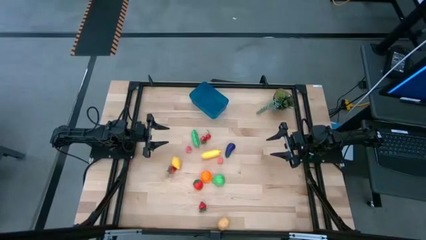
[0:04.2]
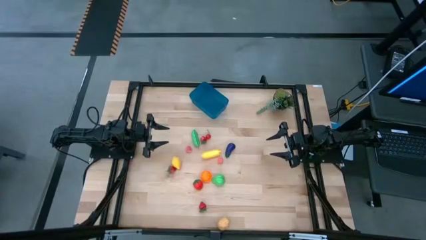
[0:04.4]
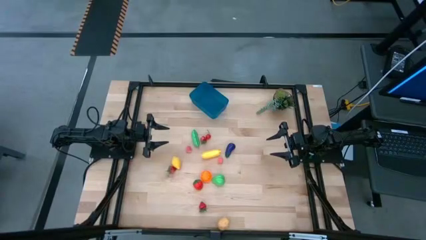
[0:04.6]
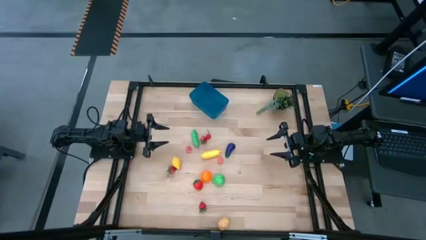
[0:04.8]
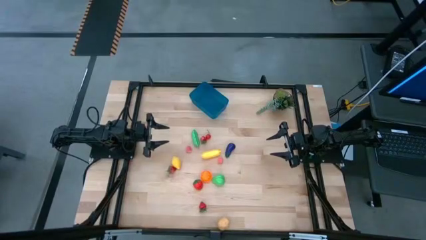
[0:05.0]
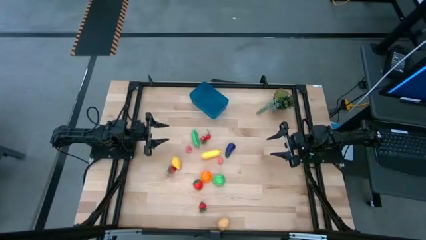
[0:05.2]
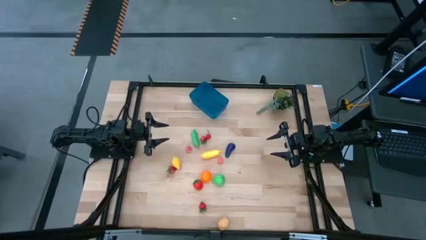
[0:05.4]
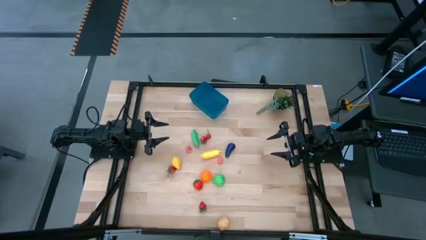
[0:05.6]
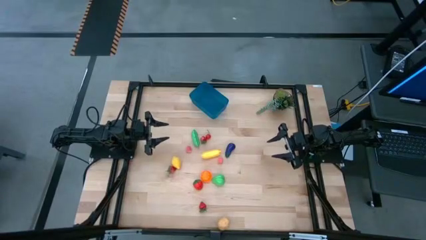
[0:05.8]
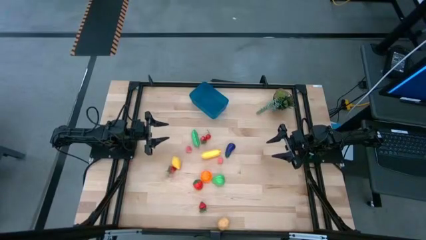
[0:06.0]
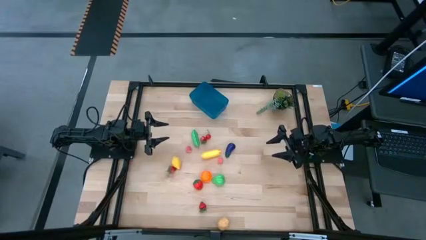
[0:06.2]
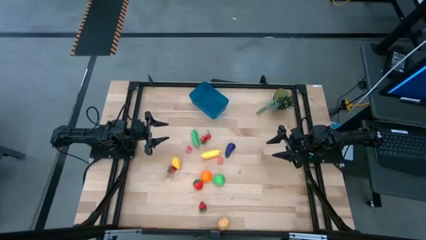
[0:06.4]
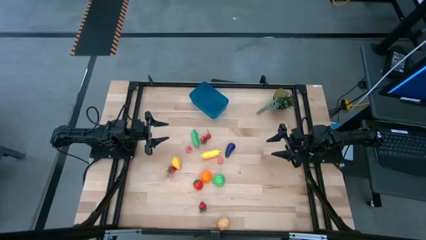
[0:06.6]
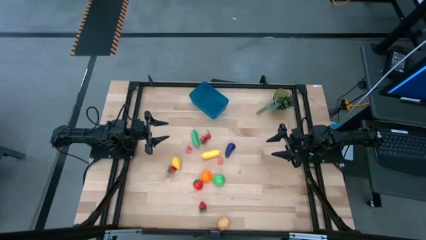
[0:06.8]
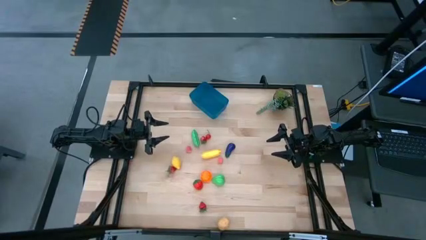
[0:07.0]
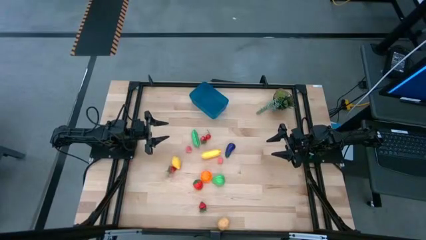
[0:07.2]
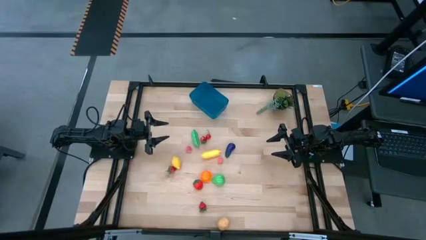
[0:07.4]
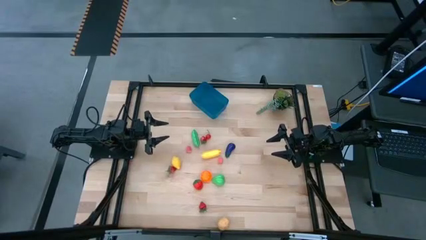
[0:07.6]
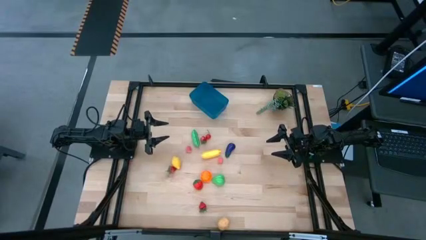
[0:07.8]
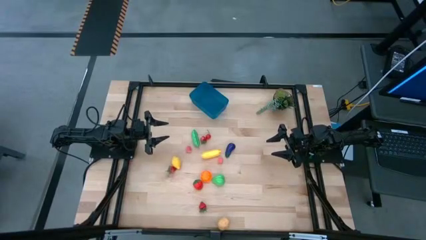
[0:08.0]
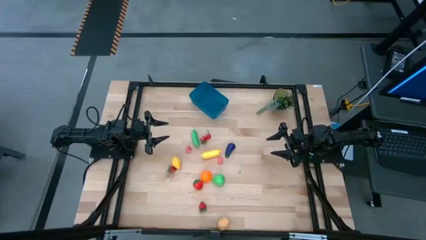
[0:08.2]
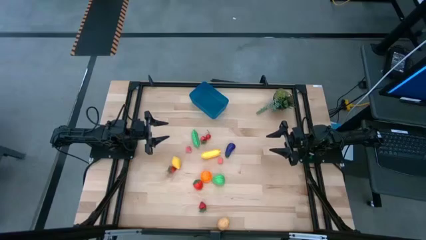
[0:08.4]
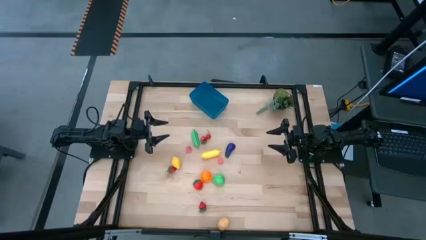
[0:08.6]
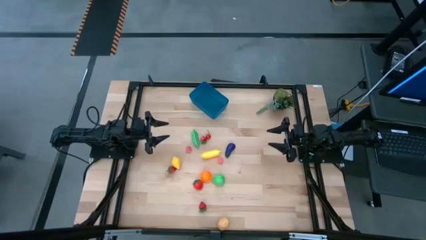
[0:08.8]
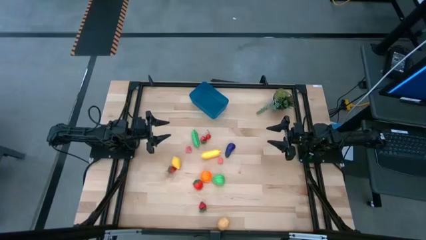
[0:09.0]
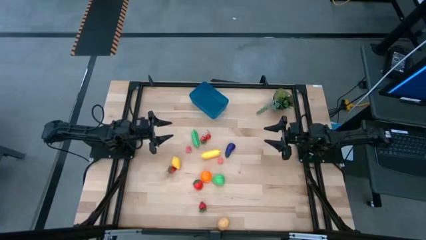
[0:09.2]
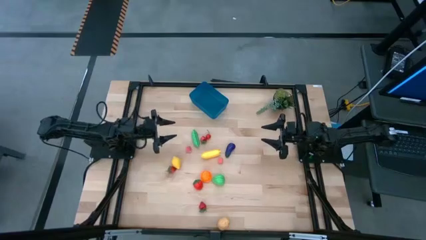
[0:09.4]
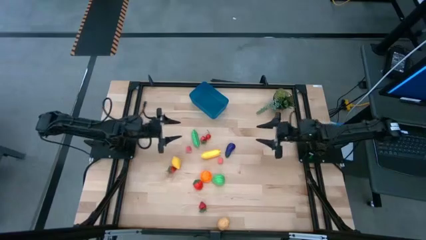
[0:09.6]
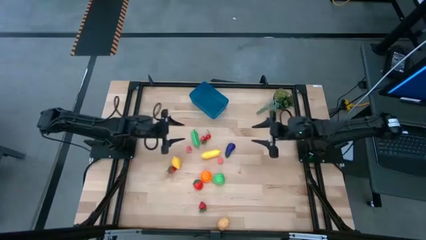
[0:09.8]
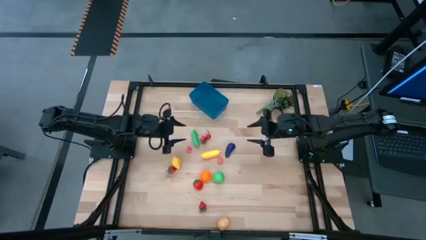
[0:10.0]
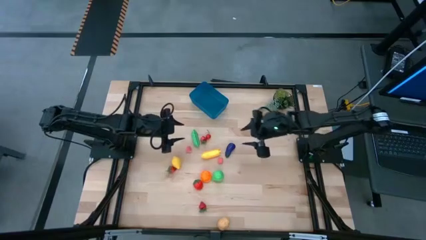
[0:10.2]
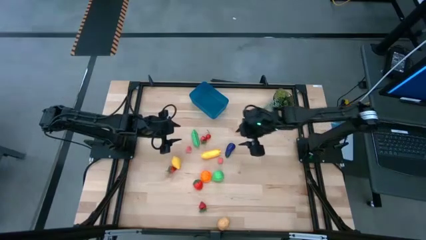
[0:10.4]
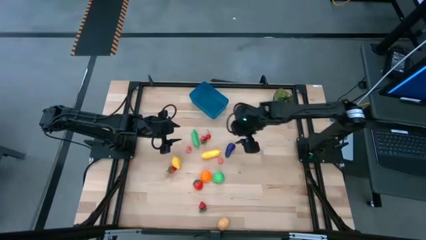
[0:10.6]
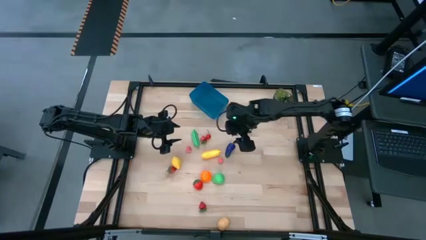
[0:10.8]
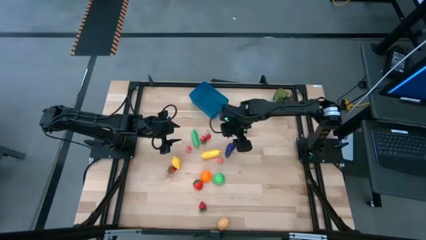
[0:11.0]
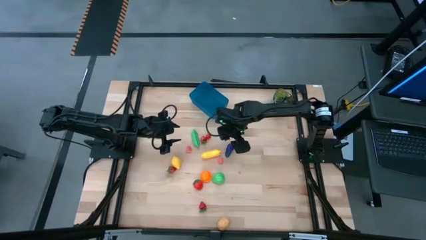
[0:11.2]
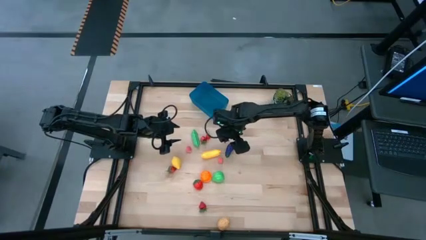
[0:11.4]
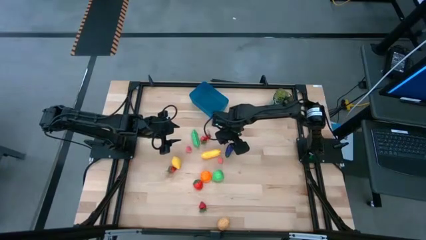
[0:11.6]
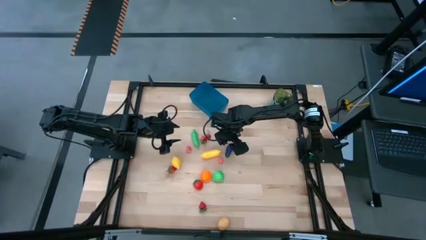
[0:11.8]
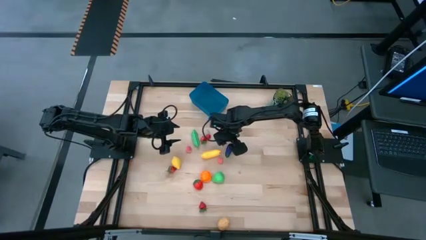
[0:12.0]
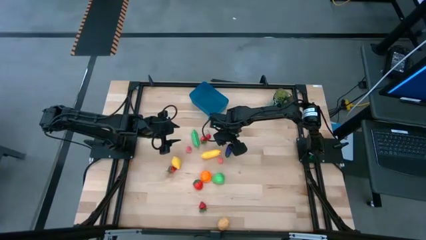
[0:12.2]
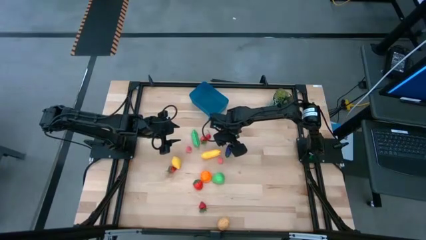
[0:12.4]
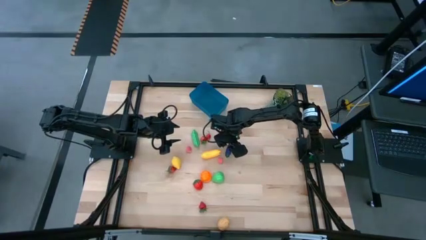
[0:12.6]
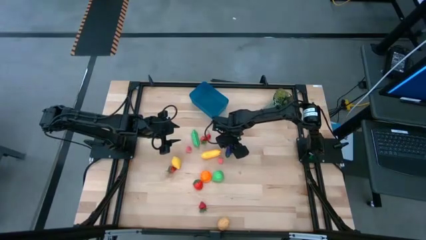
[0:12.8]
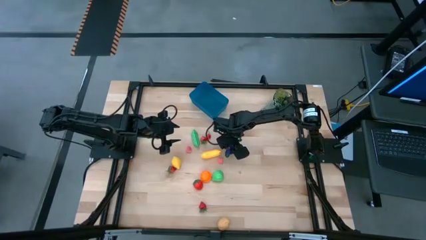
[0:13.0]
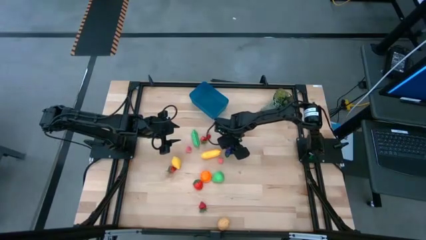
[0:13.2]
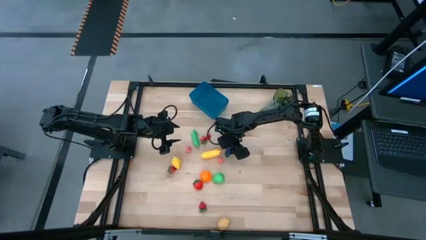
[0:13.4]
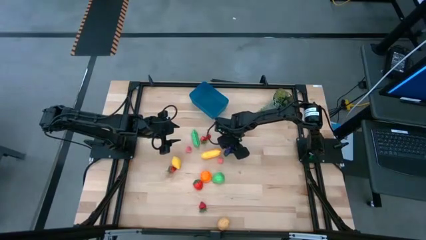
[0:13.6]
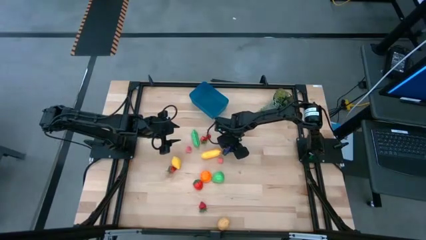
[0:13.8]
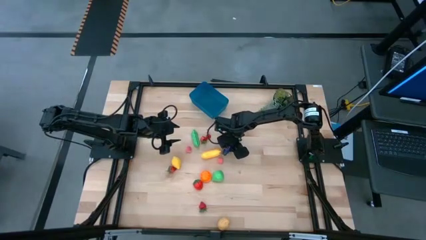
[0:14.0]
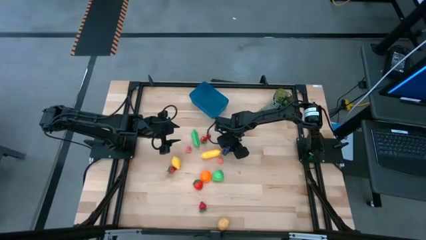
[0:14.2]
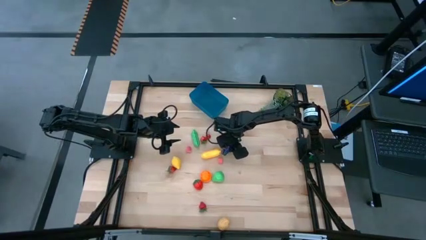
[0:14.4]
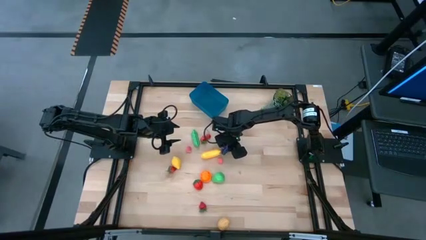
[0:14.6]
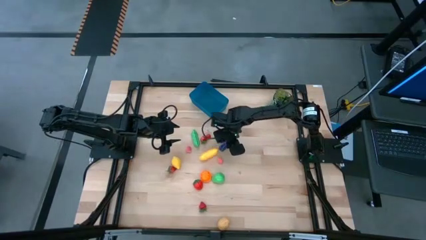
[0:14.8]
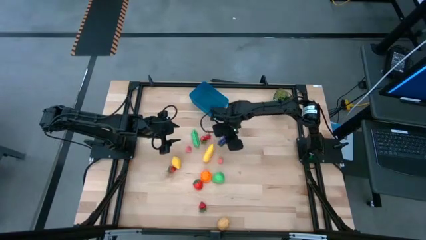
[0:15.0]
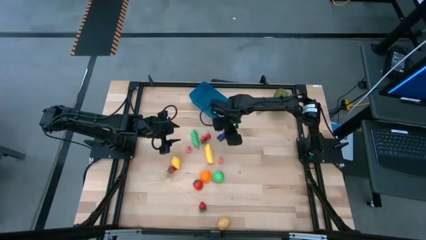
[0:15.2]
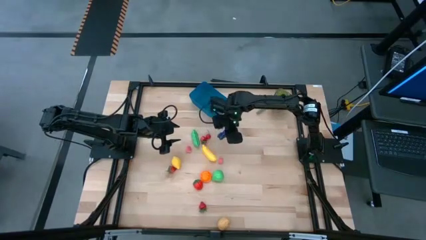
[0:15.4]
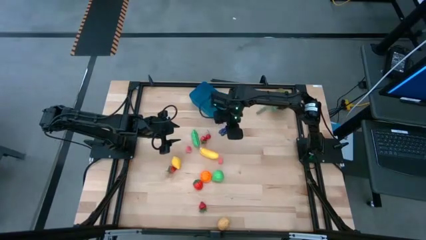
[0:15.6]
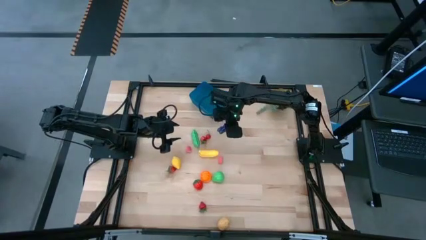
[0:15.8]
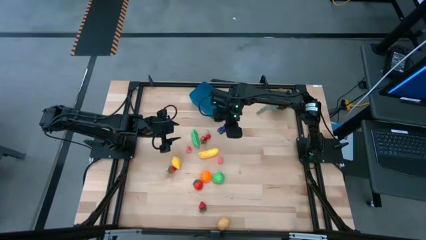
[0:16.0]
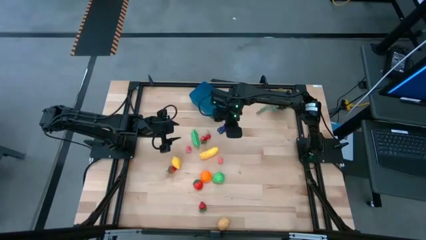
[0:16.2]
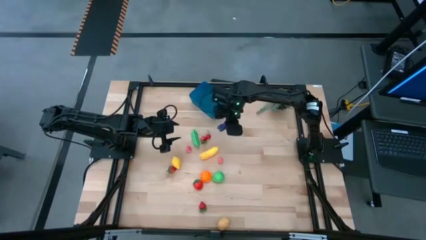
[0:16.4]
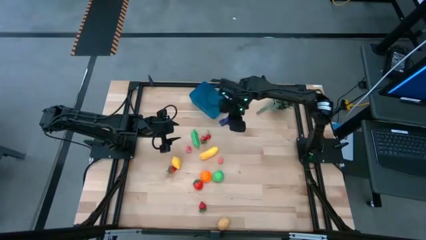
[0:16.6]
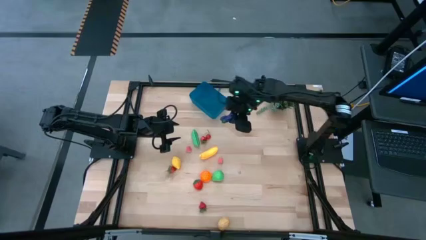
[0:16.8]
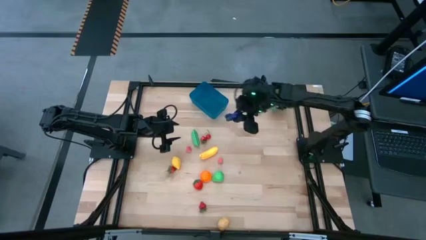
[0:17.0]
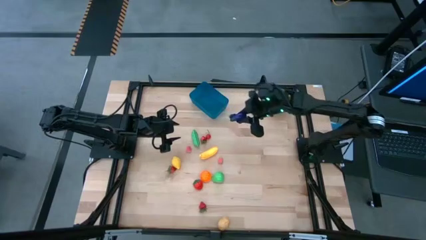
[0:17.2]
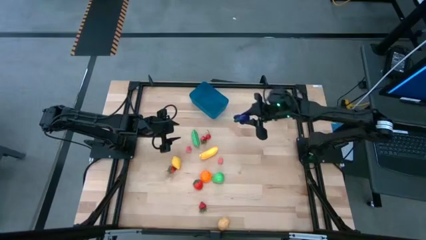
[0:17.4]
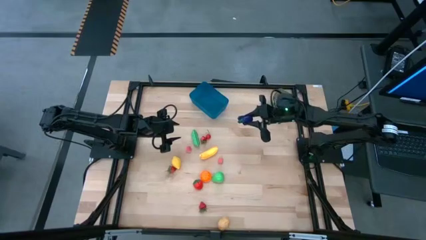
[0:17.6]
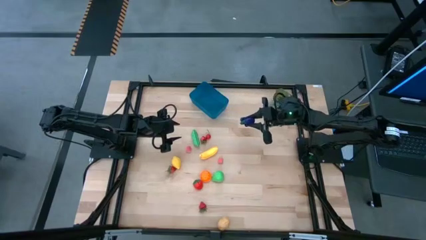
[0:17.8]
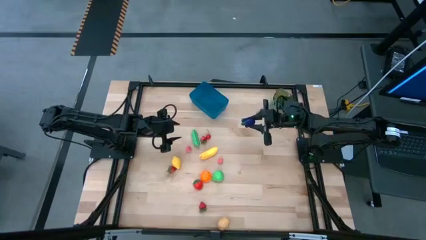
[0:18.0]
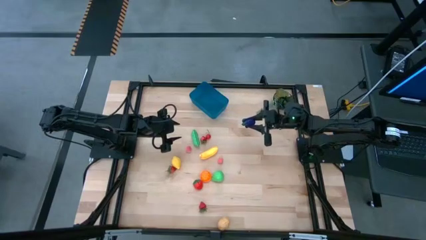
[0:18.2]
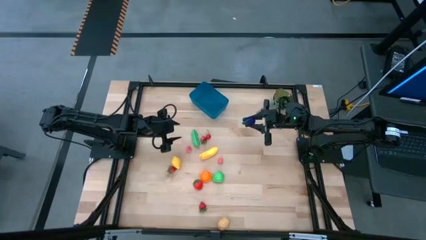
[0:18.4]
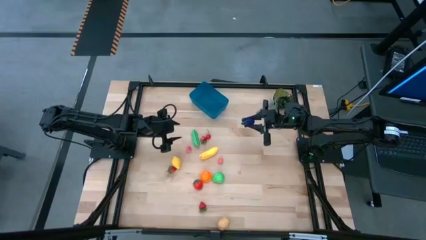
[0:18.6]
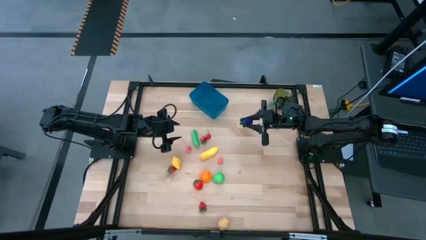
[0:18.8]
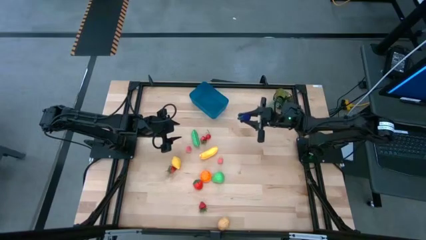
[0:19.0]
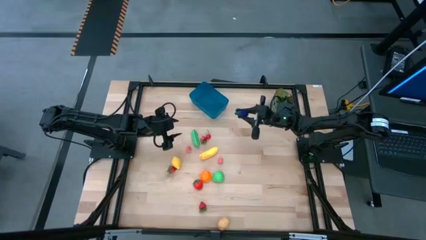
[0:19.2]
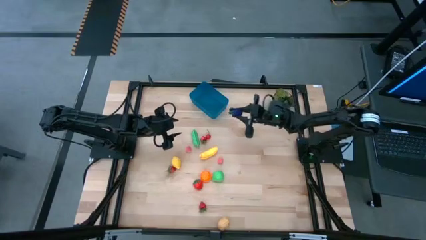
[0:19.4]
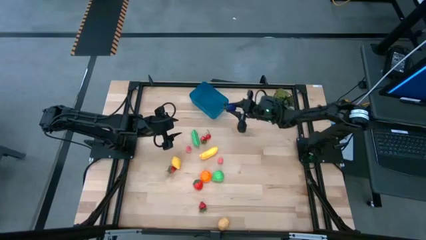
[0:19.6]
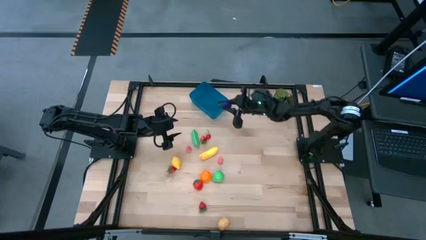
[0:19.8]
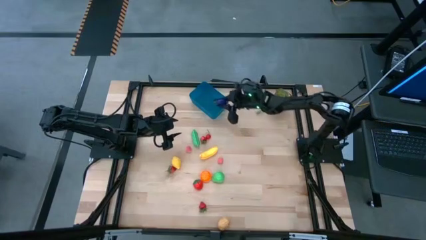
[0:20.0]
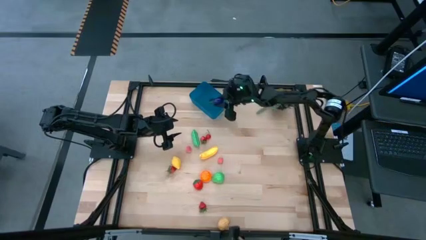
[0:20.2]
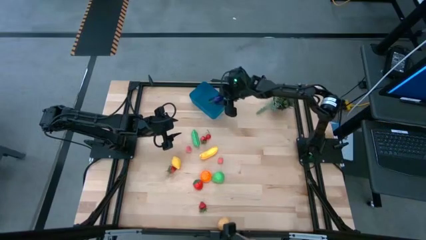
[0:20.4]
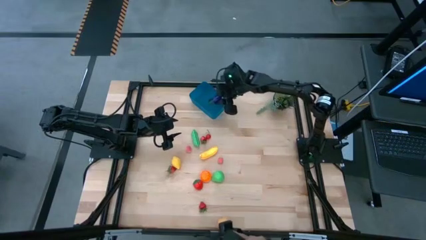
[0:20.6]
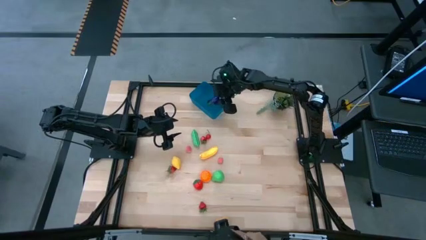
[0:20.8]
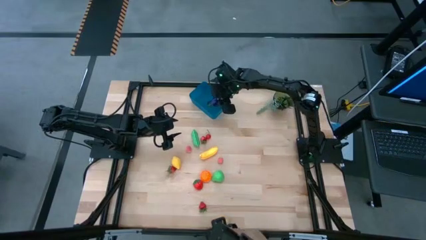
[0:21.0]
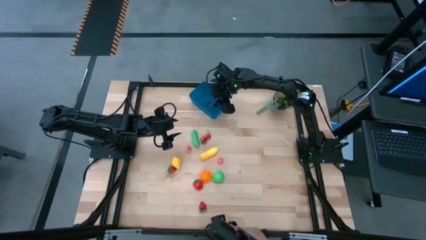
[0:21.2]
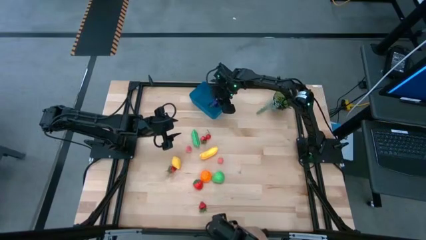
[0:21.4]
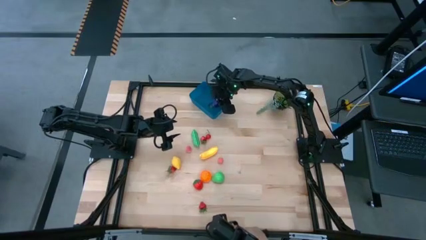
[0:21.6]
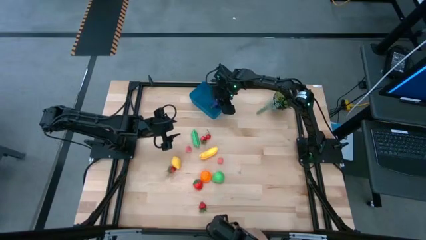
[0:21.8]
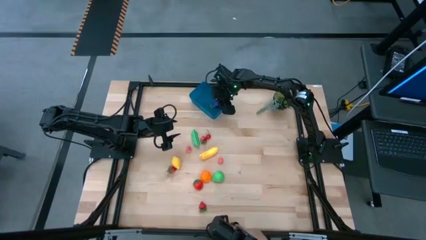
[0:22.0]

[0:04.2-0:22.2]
Task: Pick and placing Produce into tupperware
Put the violet eggplant into the blue bin
